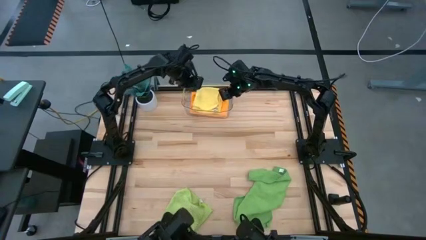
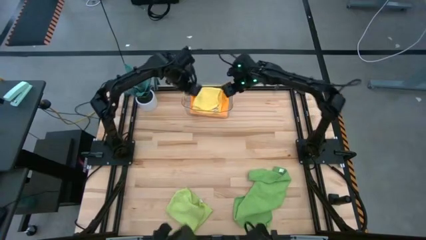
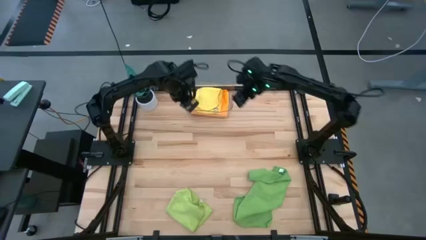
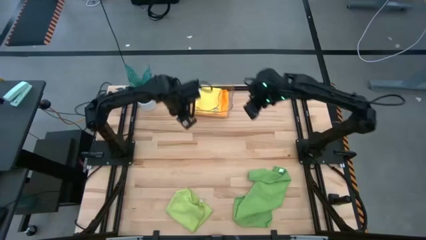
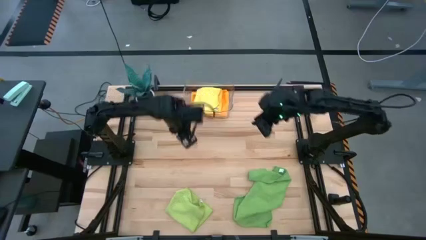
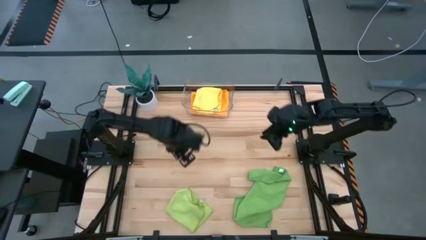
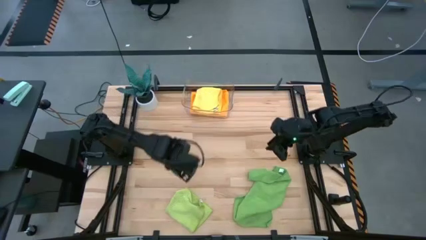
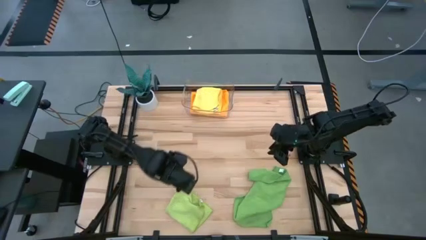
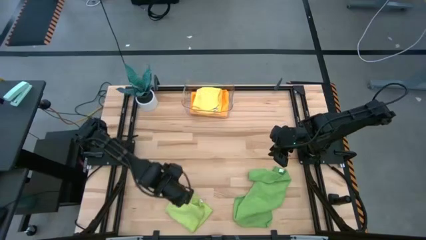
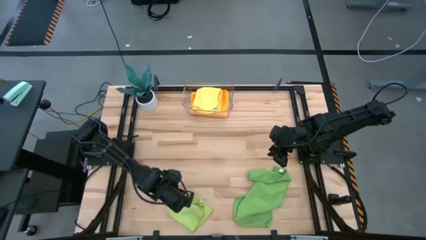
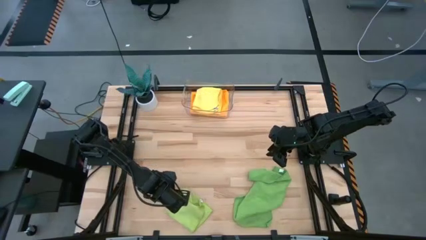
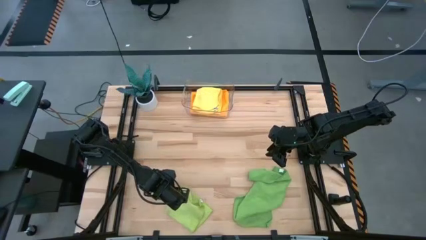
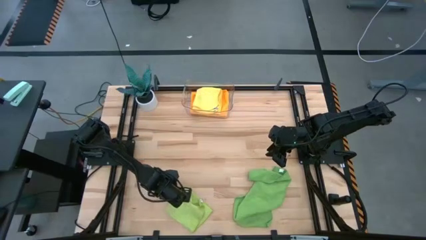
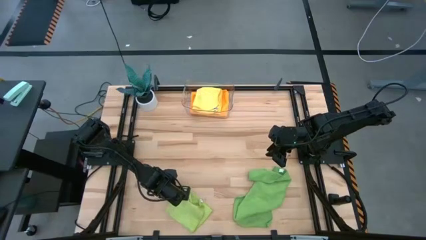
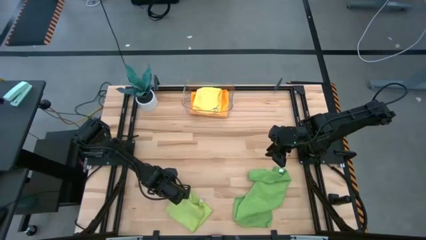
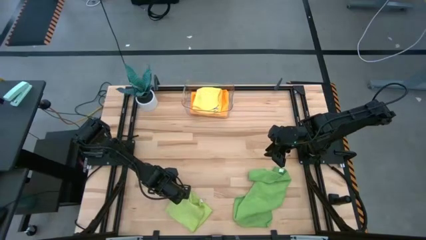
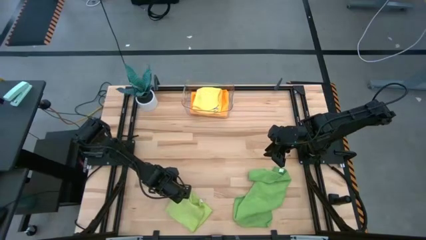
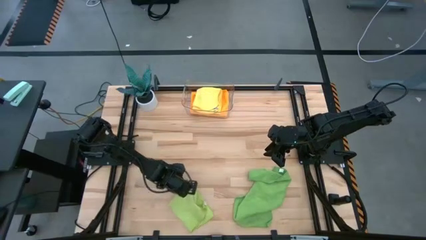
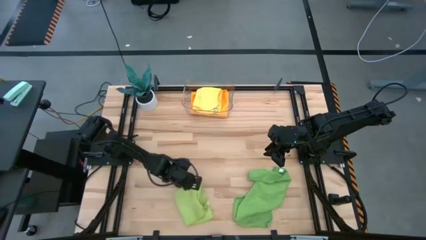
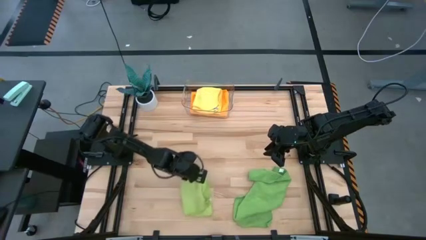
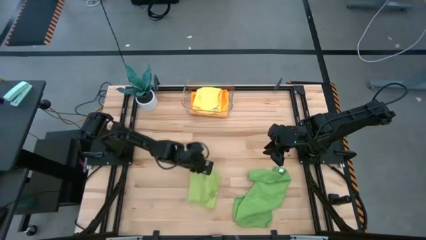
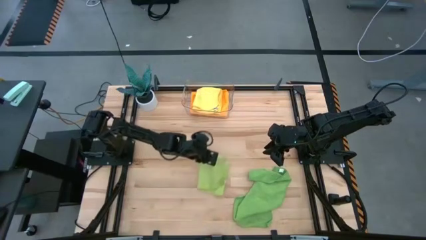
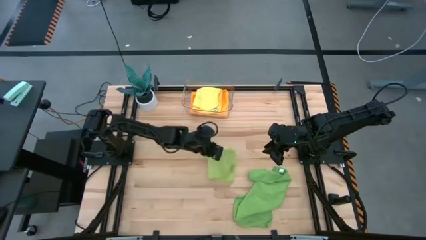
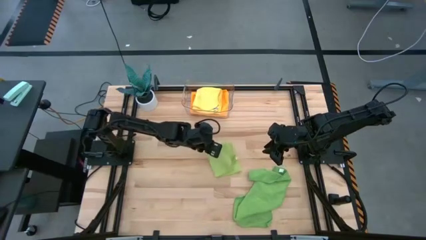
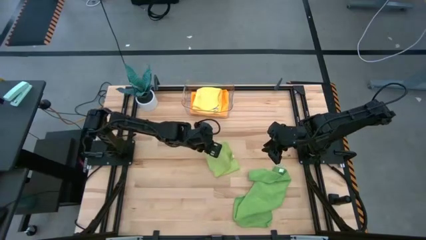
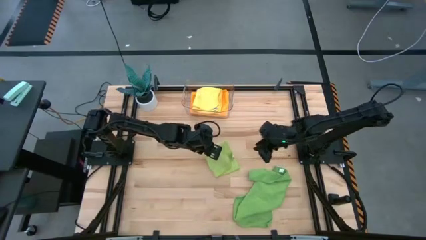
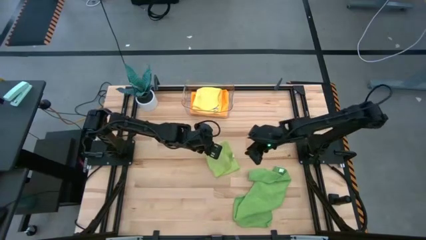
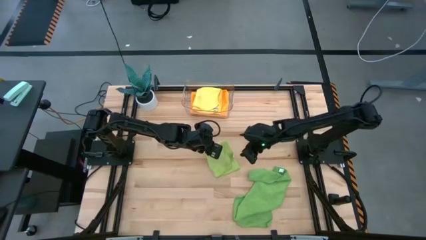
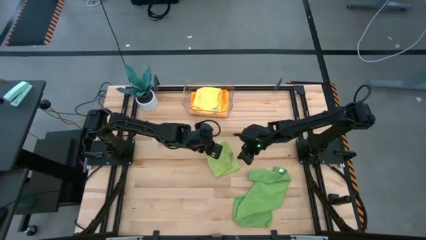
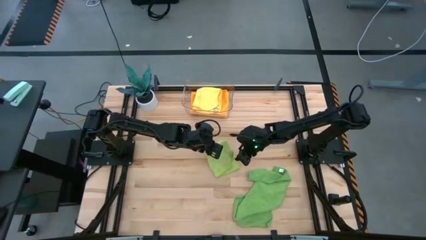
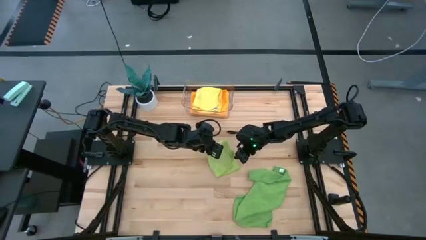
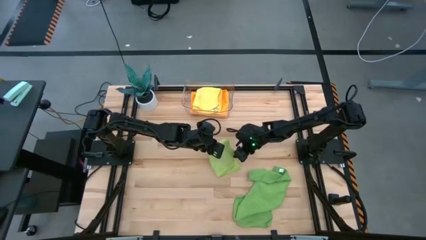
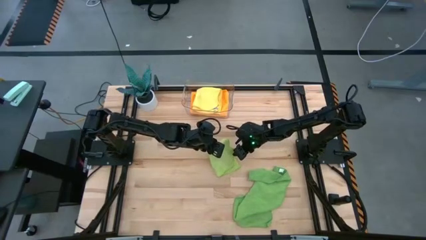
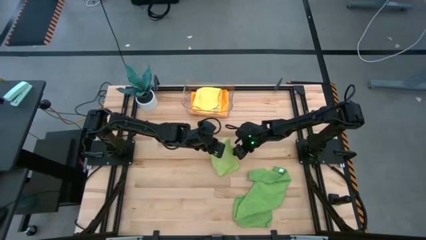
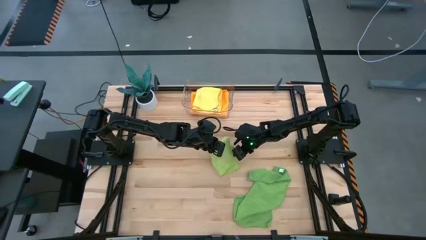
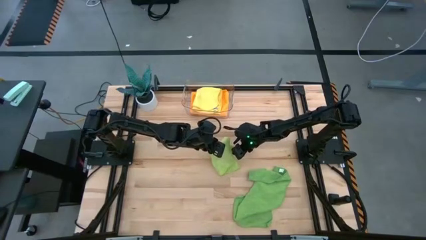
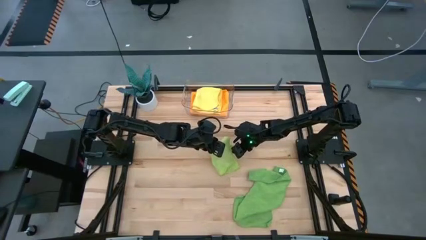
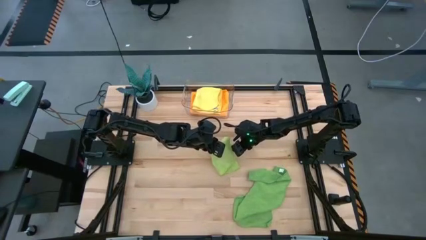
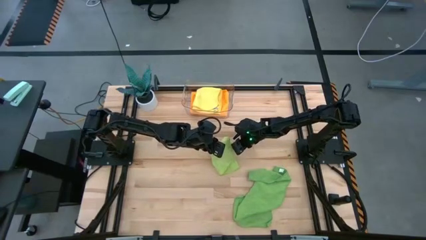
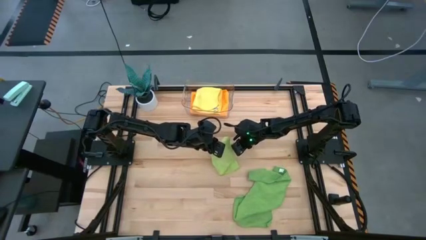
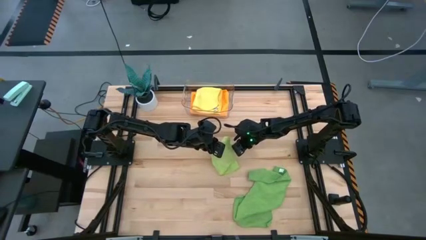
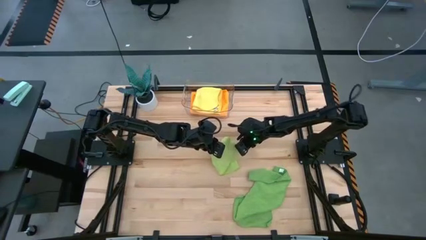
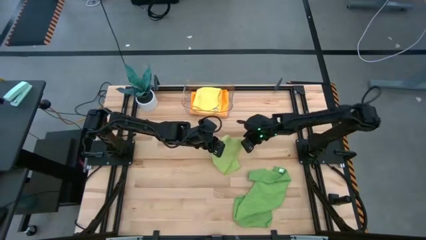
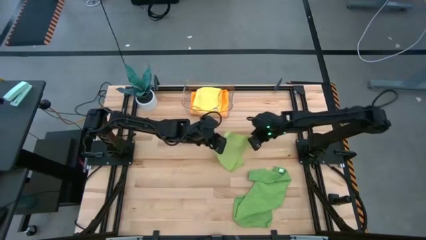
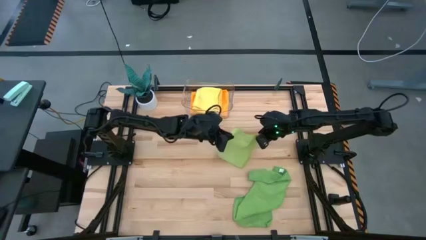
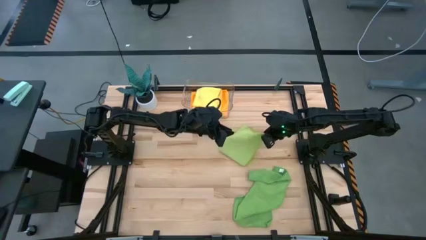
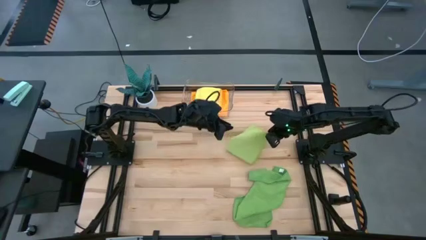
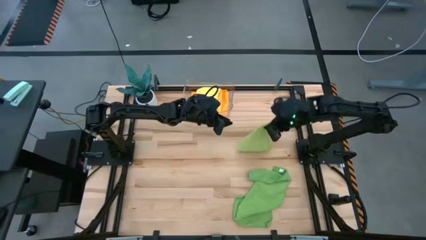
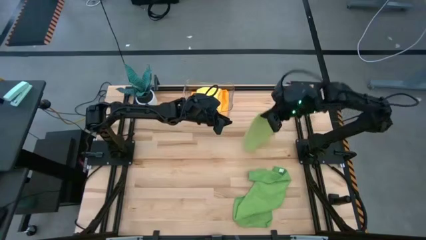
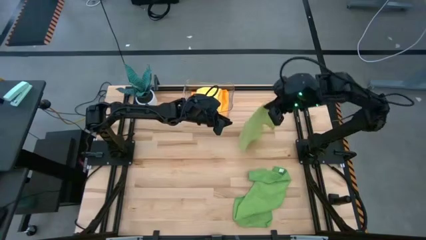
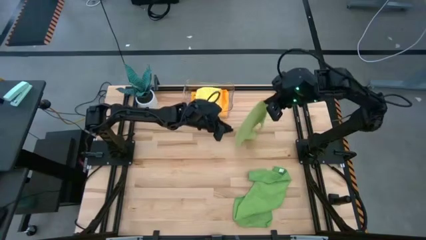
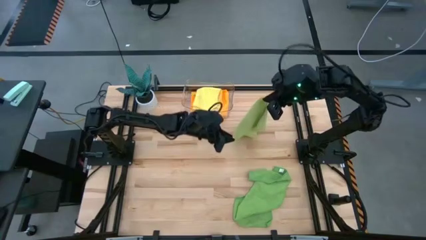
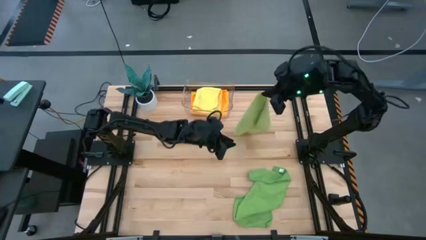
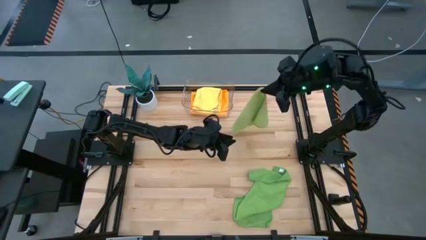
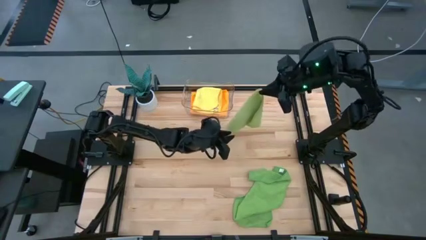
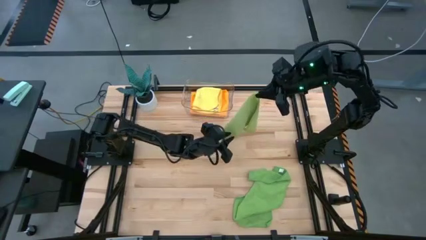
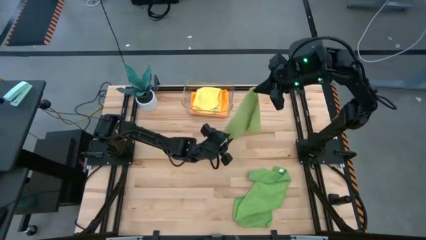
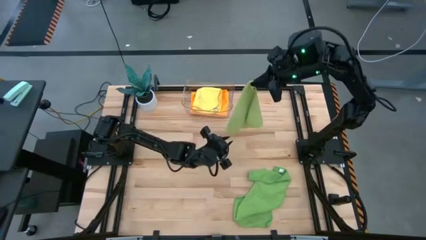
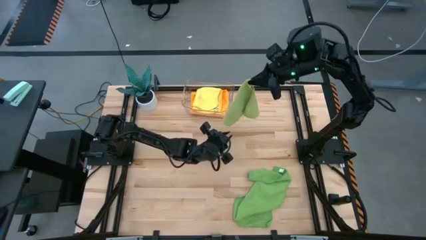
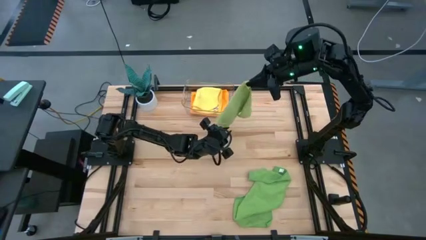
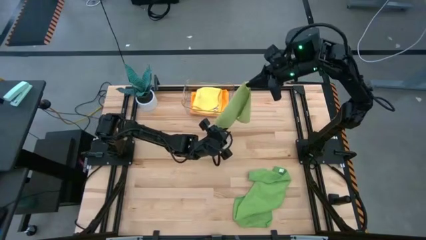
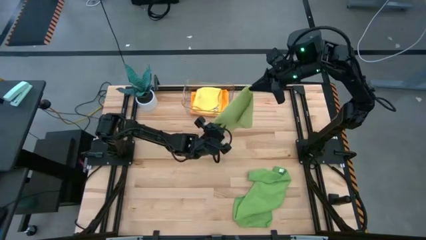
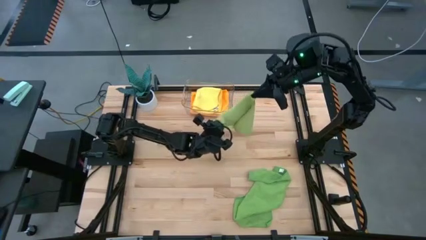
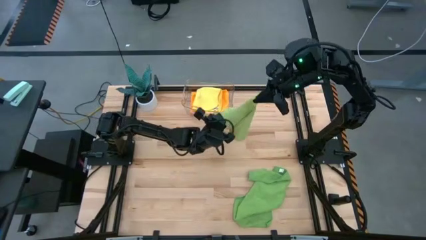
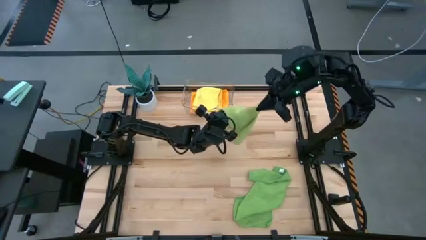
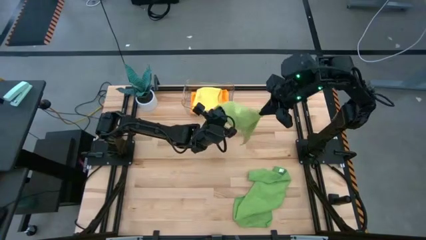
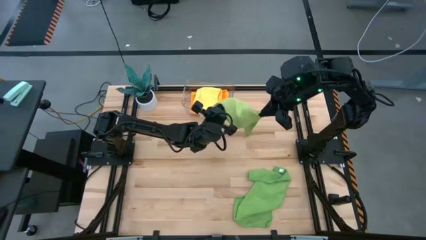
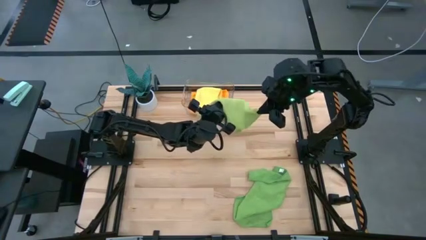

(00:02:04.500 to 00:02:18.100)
Task: Fold microfiber towels
Fold the light green towel
